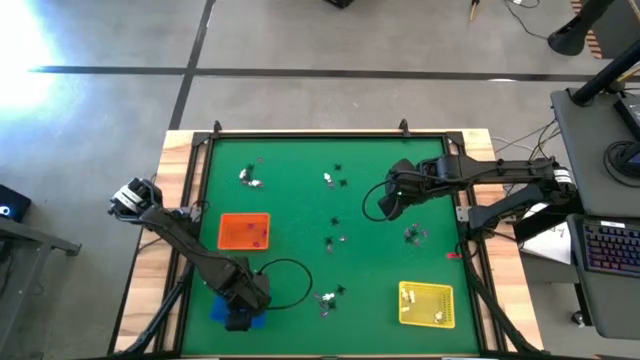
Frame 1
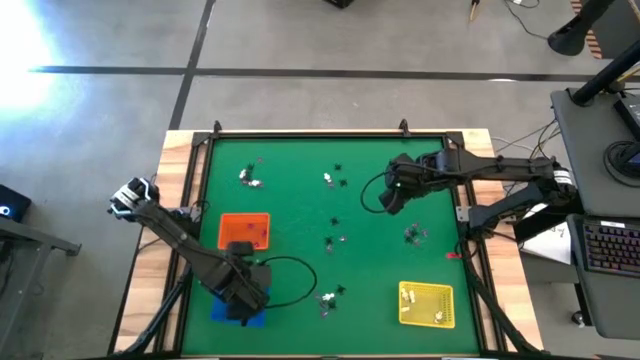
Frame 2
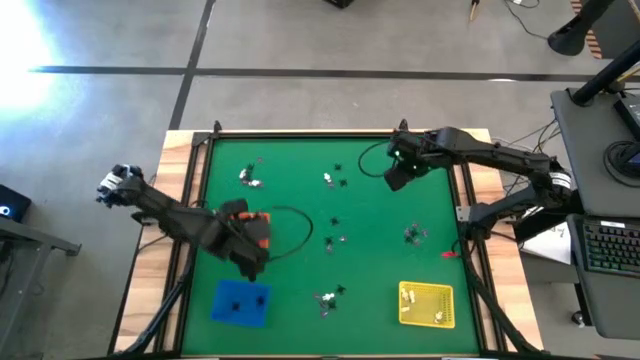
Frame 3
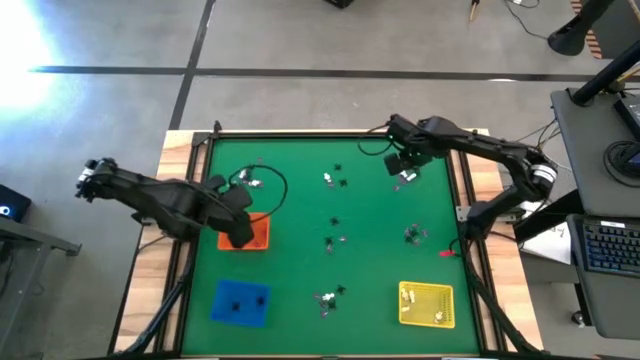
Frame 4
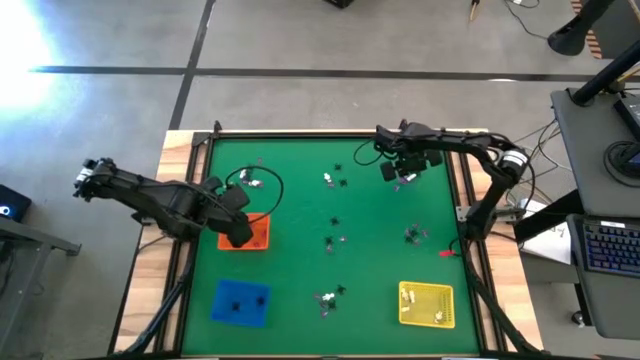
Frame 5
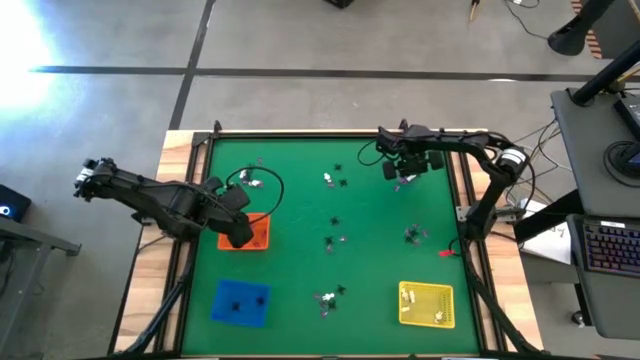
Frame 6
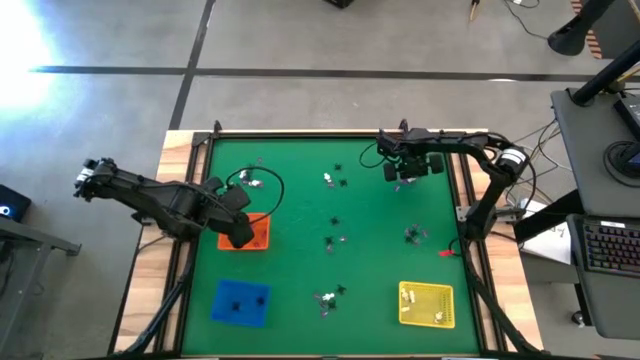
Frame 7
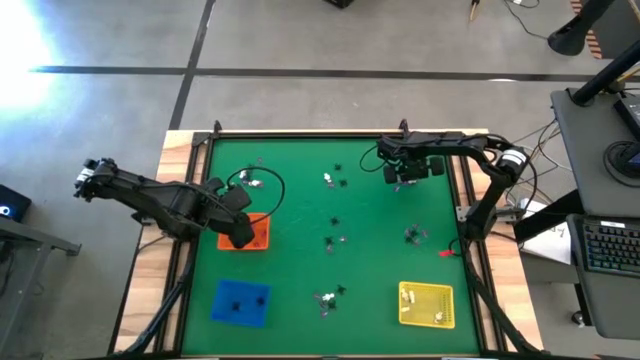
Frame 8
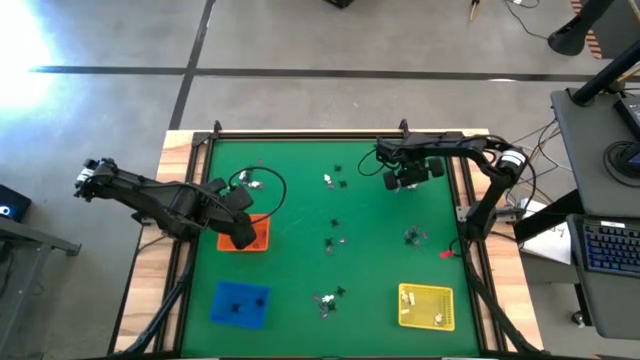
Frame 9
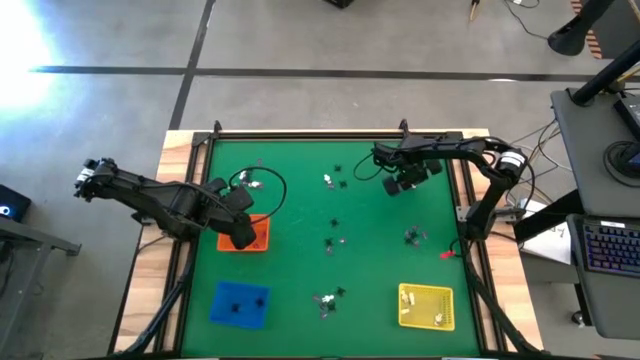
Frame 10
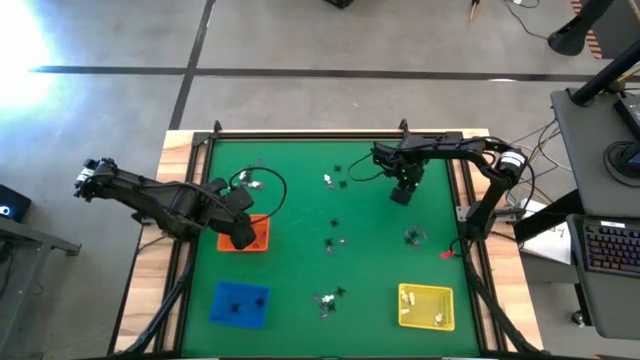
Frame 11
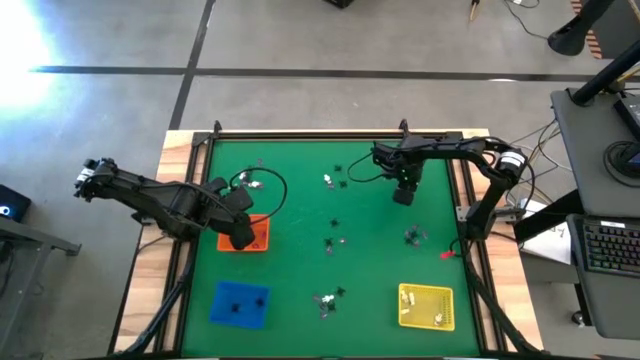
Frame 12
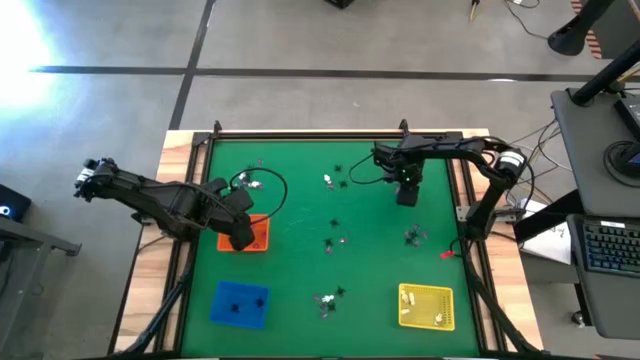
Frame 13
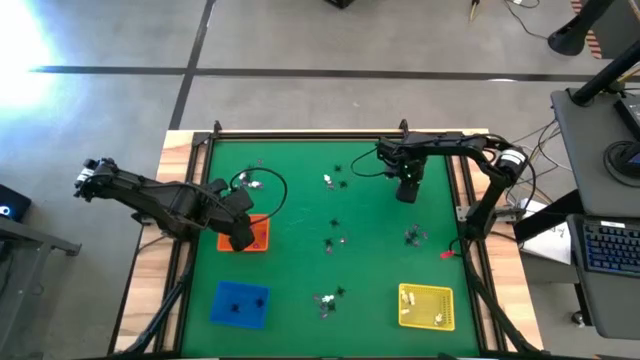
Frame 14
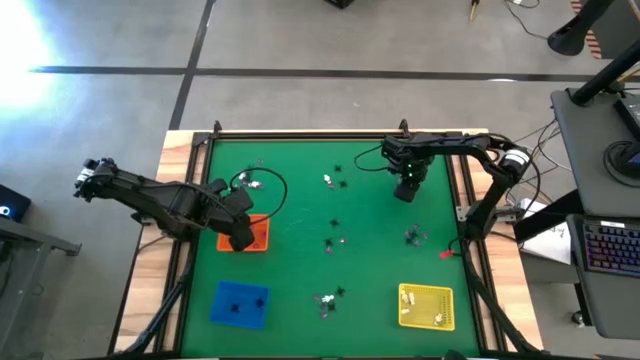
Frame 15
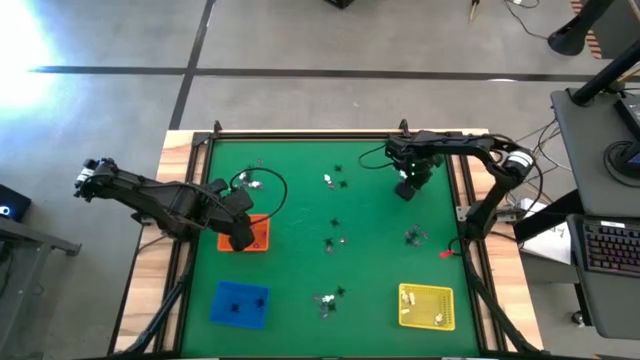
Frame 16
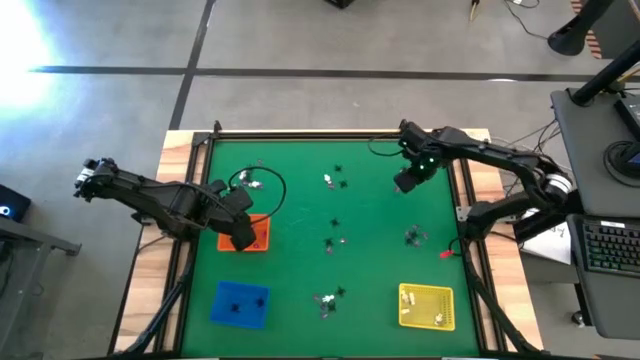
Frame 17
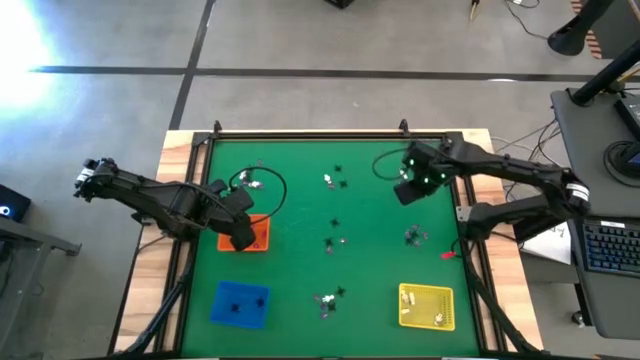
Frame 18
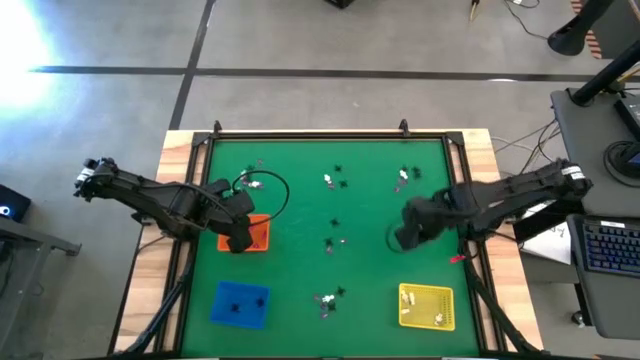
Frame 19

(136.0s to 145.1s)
Task: Sort Halloween decoration
Put the white skeleton toy into the yellow bin

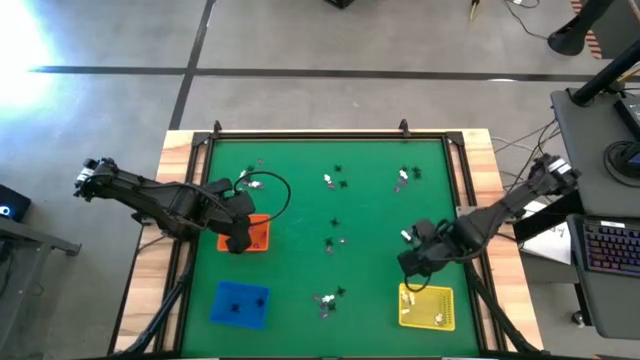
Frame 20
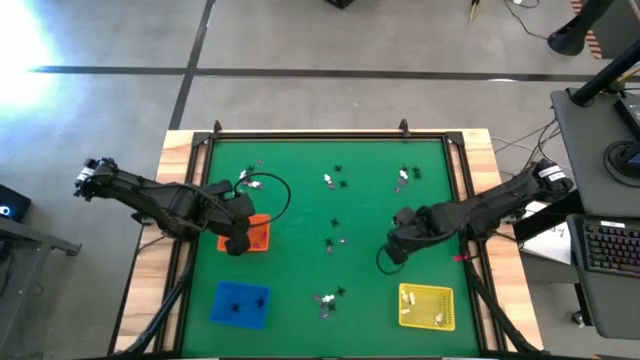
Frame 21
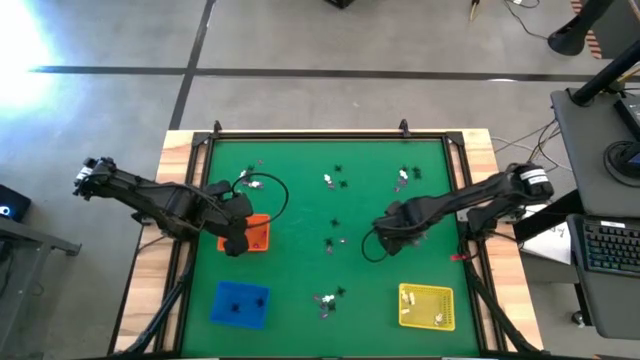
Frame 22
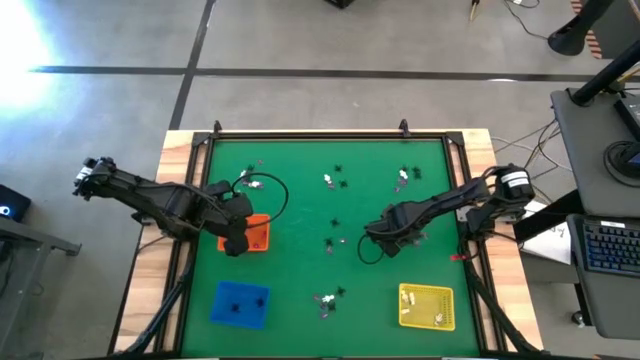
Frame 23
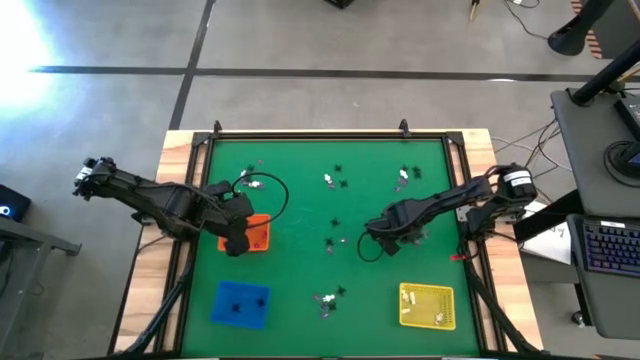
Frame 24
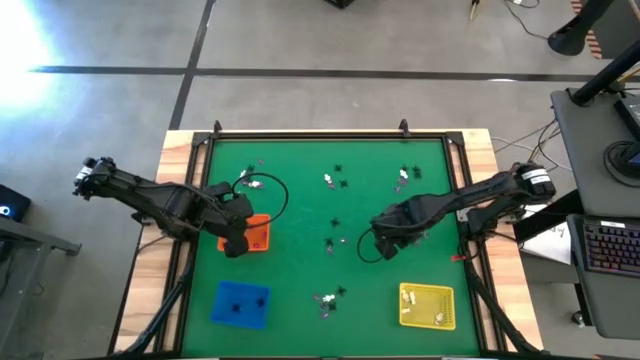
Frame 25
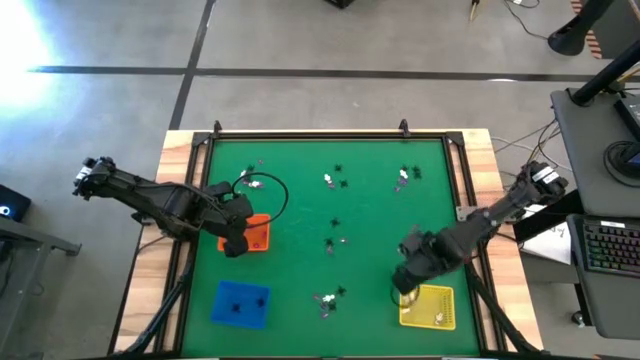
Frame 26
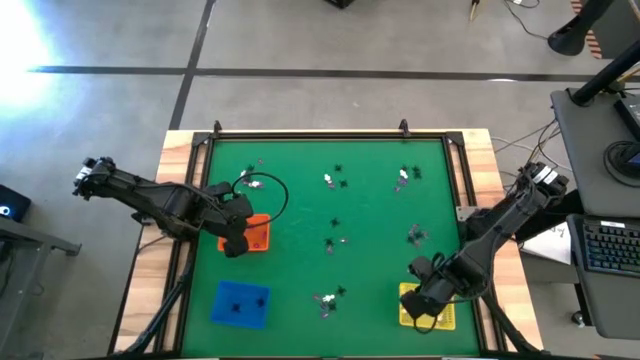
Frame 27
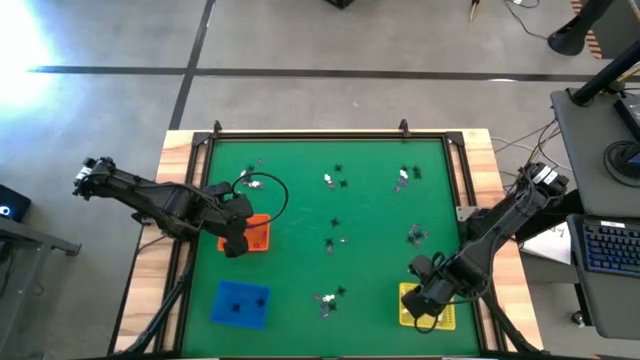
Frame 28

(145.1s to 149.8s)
Put the white skeleton toy into the yellow bin

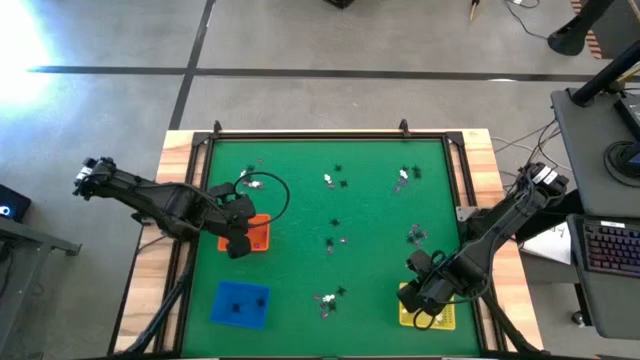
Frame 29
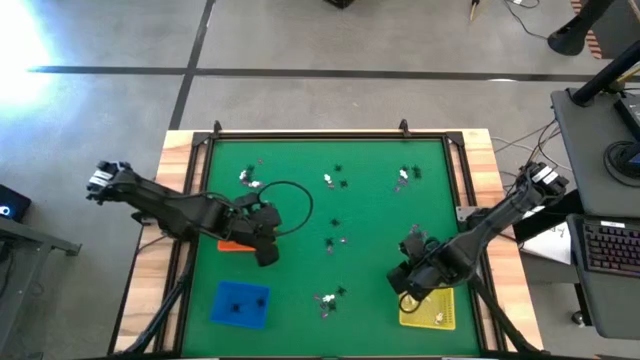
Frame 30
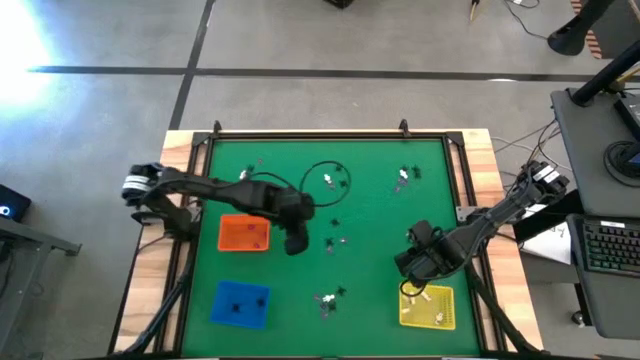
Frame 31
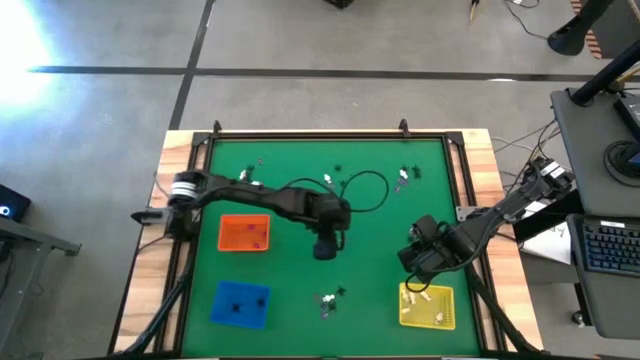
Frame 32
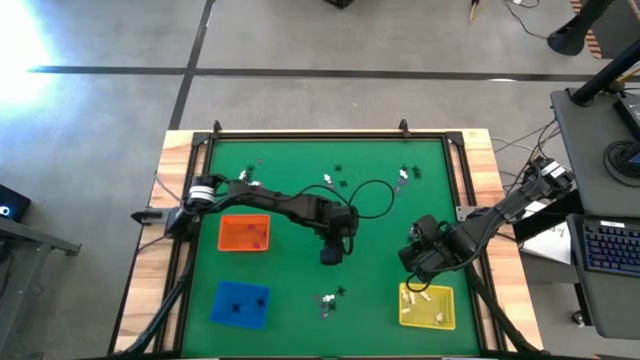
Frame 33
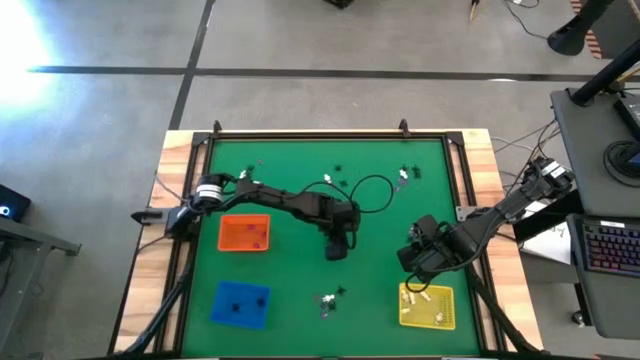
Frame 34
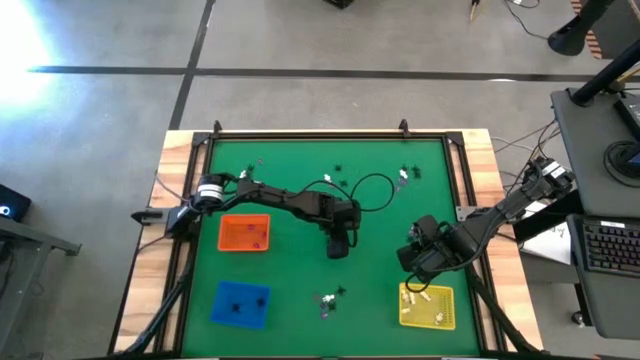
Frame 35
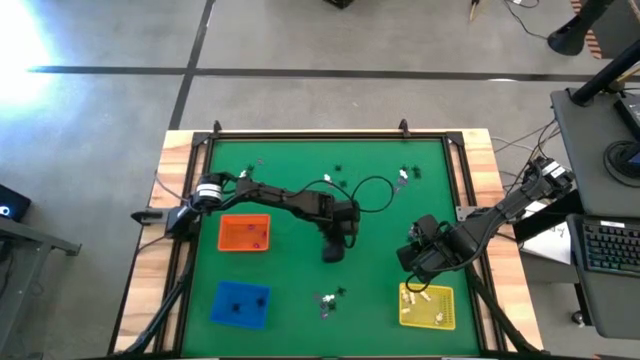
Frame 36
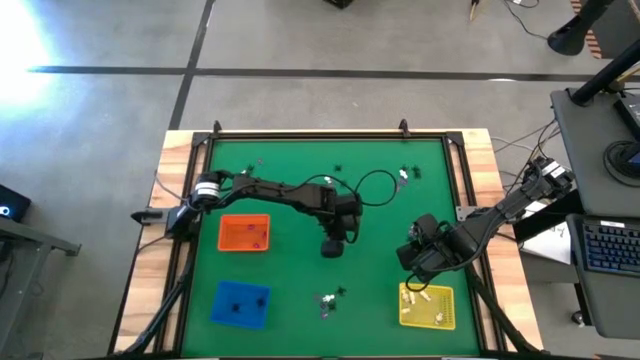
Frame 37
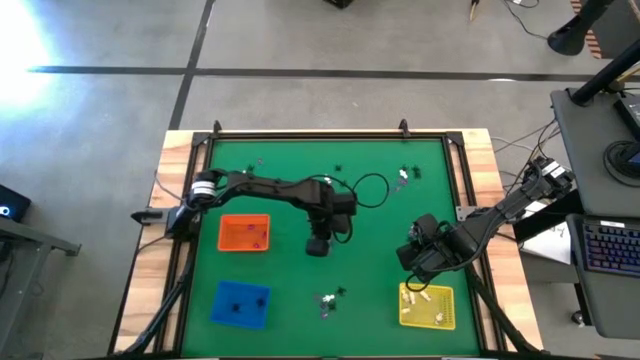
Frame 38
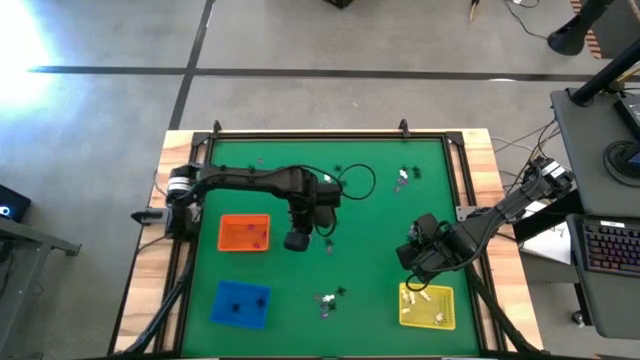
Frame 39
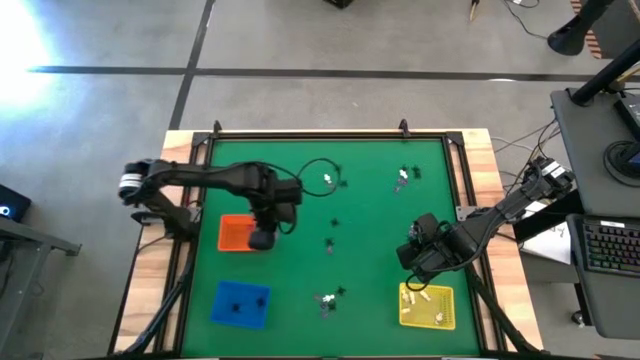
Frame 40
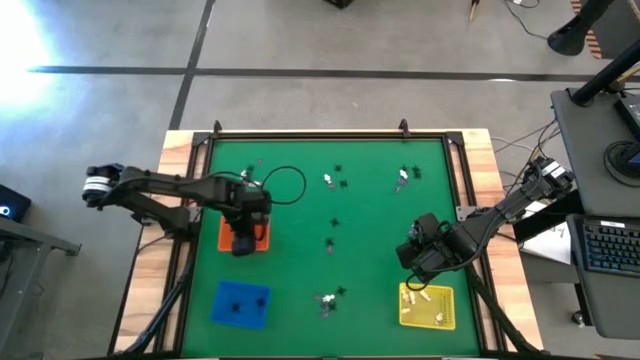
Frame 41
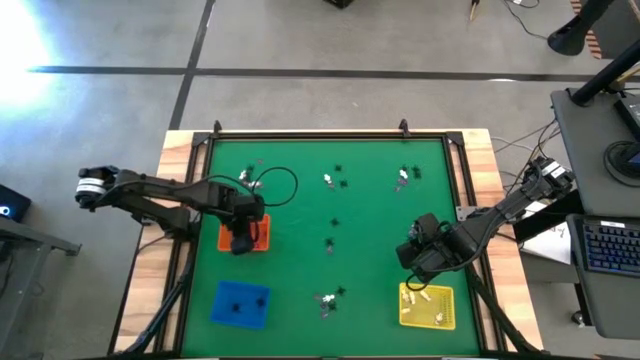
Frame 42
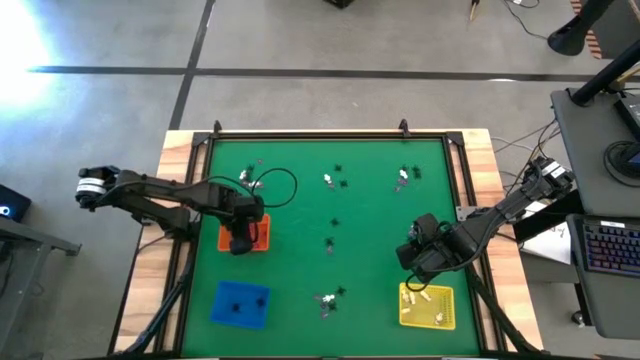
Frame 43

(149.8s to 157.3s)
Put the violet witch hat toy into the orange bin

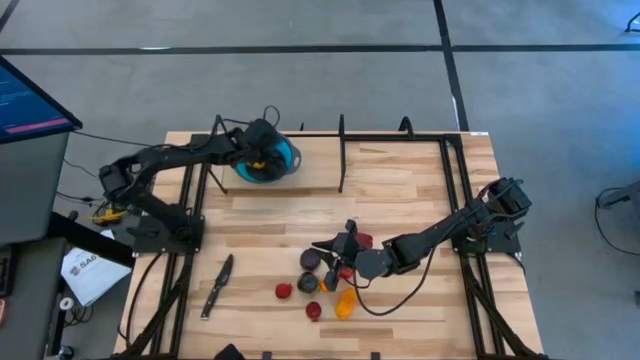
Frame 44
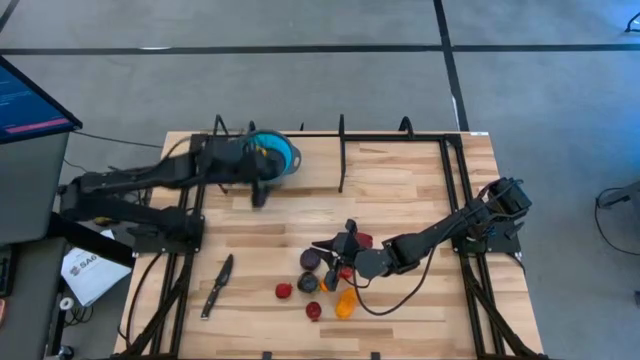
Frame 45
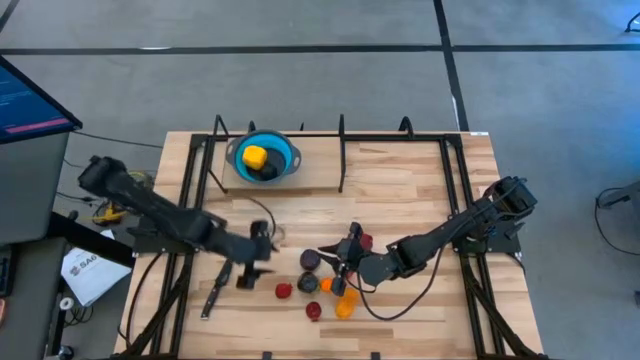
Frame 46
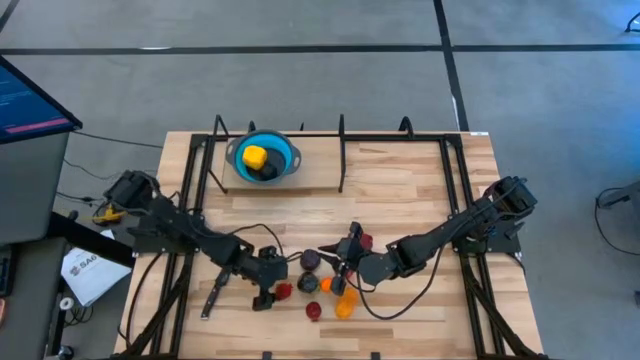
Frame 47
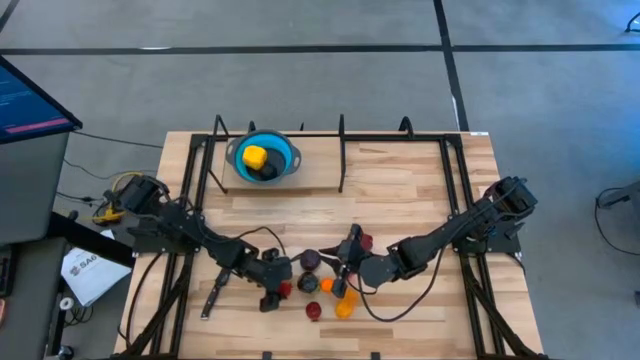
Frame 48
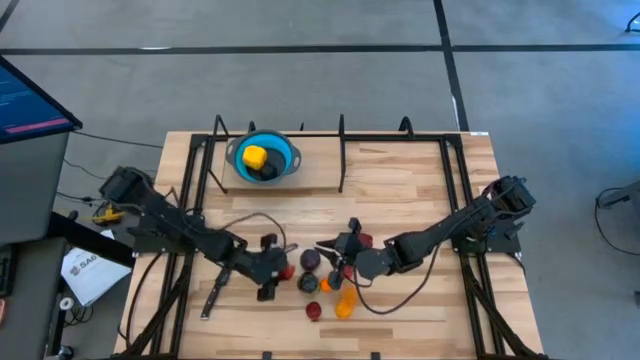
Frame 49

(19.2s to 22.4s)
Task: Pick & Place Fruit
Put the top pomegranate in the blue strainer bowl on the shelf
